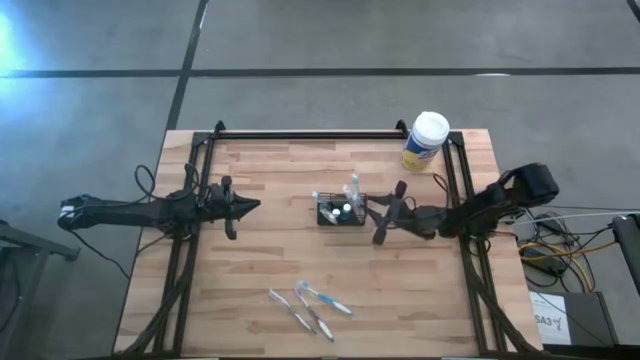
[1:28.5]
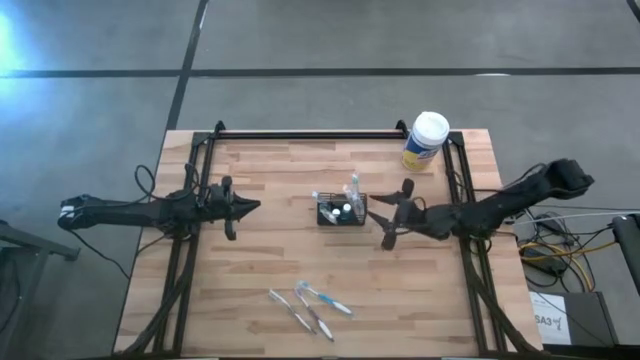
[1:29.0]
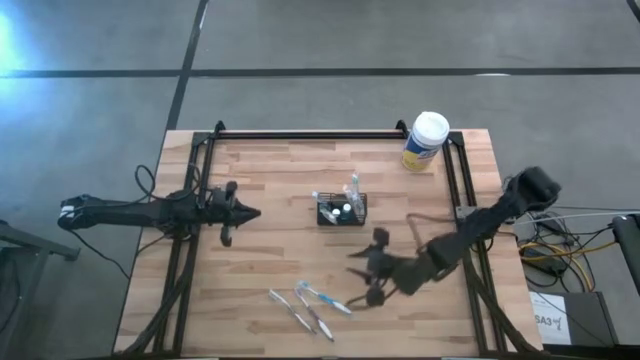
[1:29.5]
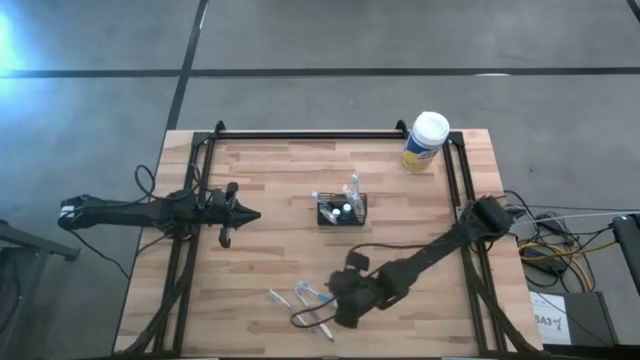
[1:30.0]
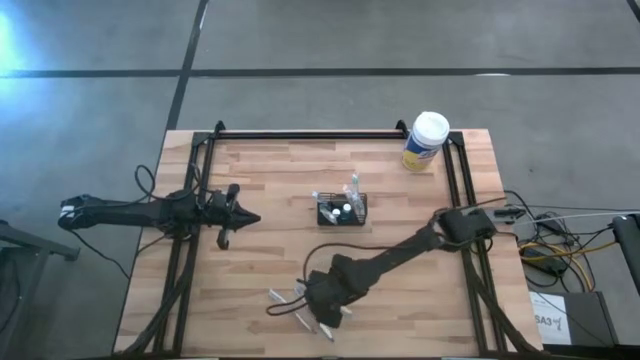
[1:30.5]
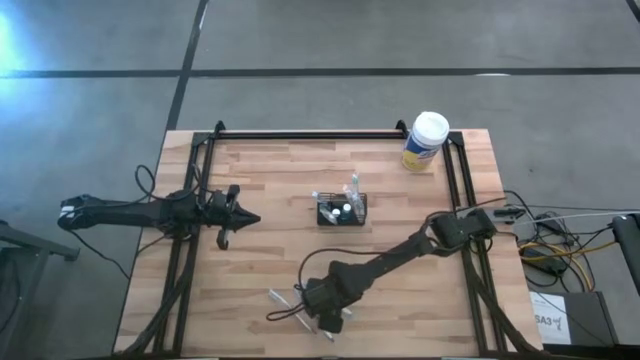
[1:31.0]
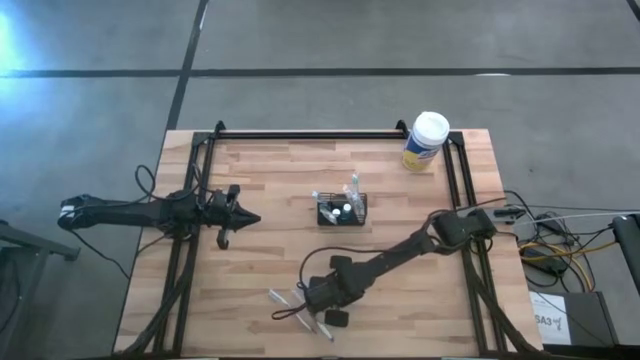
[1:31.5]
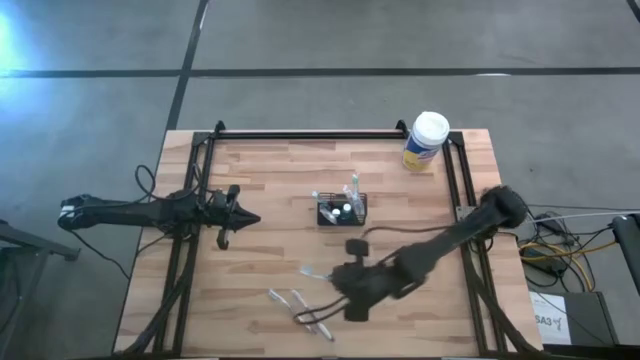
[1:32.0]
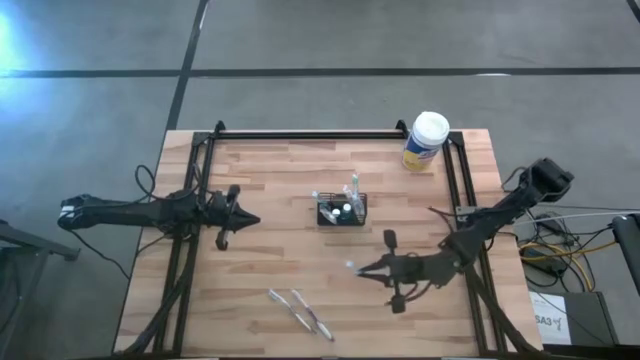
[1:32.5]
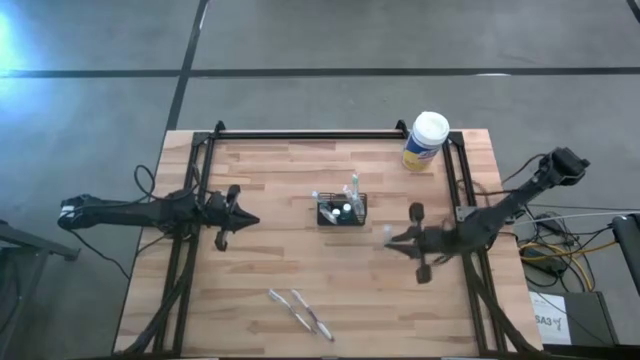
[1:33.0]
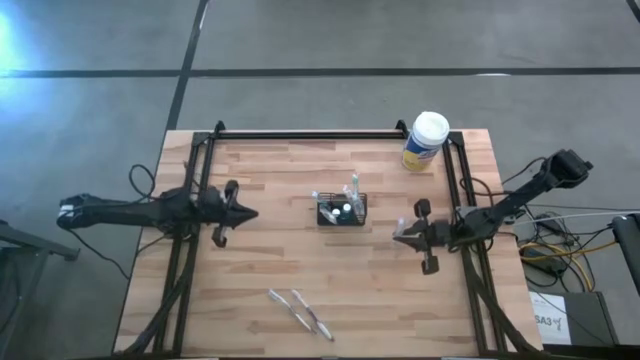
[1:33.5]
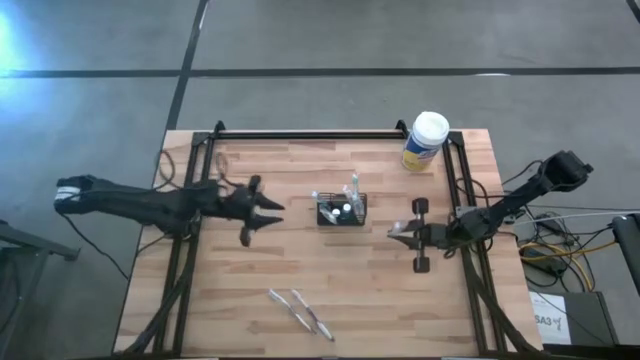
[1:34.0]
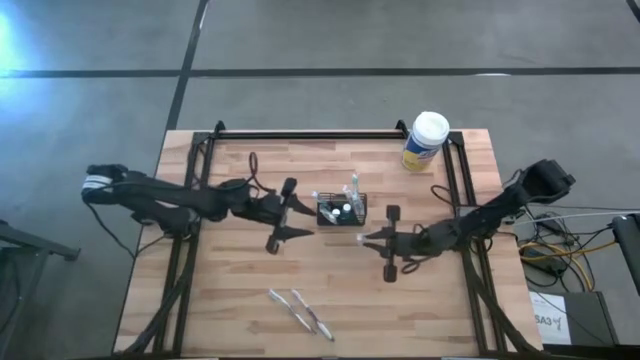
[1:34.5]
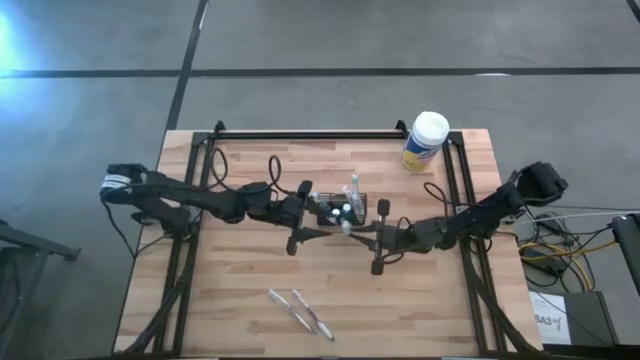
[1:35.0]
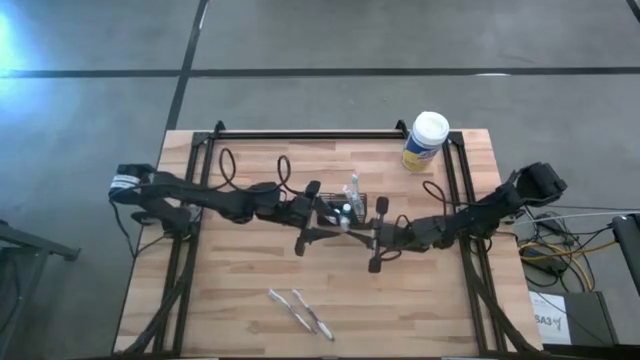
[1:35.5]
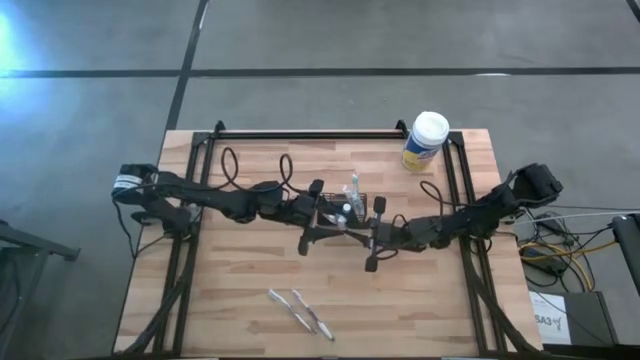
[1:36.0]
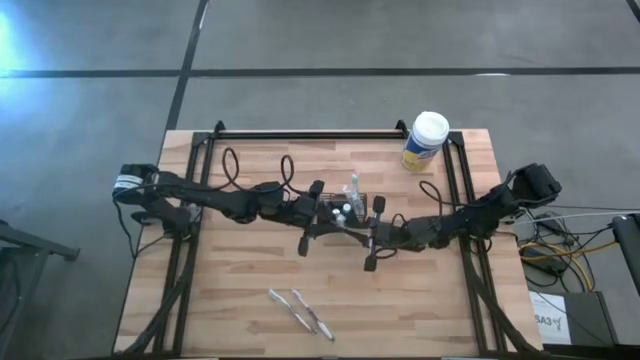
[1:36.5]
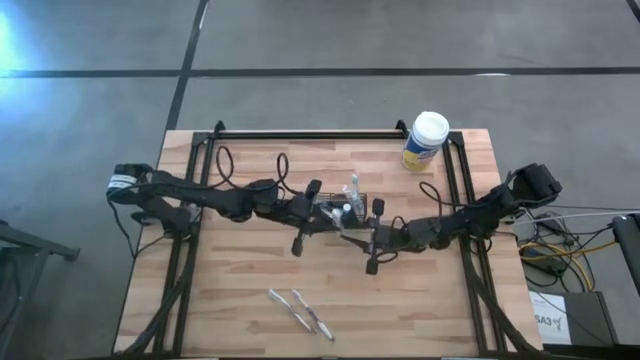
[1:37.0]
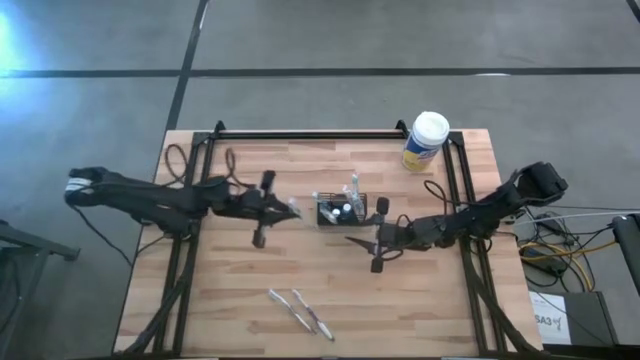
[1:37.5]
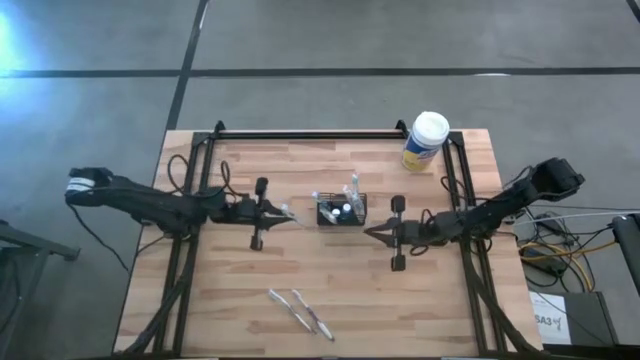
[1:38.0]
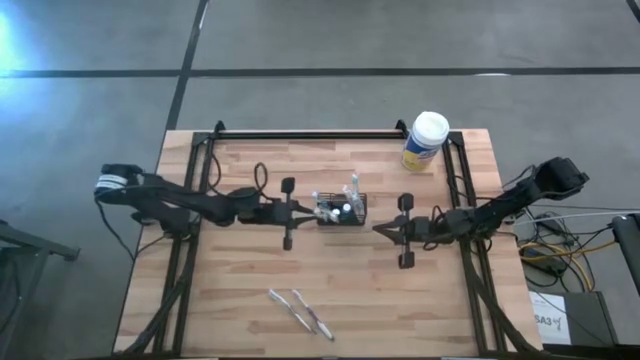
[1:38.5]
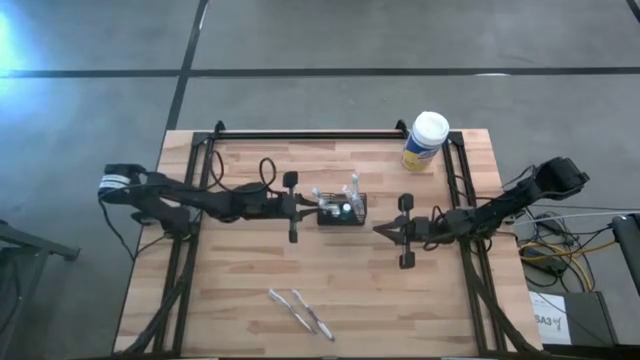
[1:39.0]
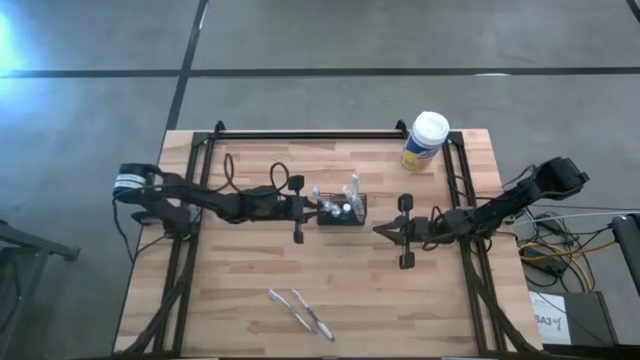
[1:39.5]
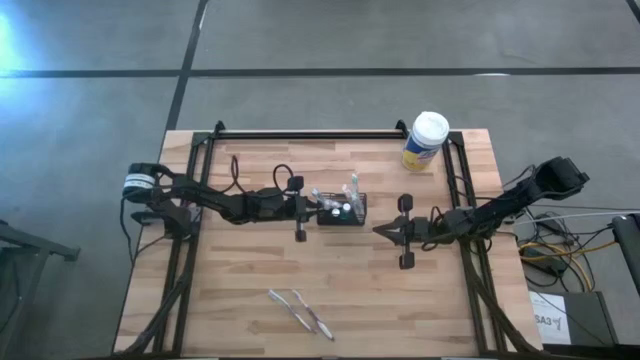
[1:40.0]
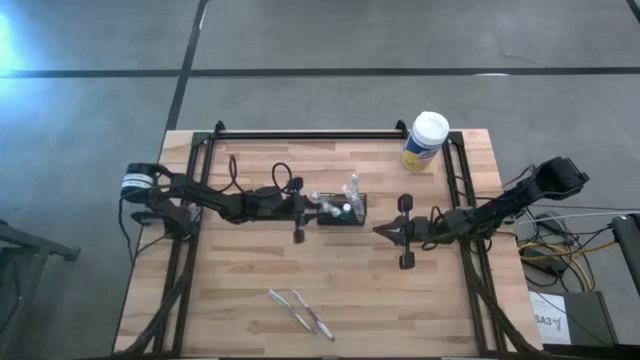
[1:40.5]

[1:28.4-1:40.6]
Task: Pick & Place toothbrushing station
Put the blue toothbrush into the wire organizer

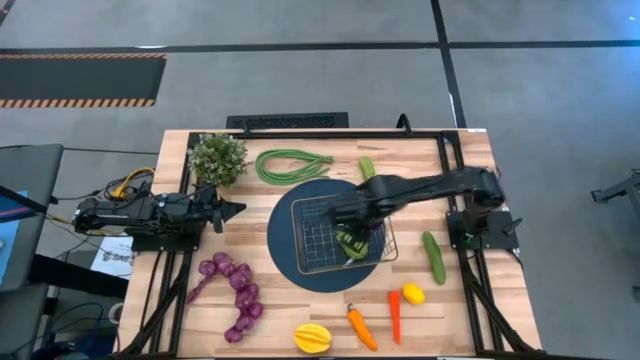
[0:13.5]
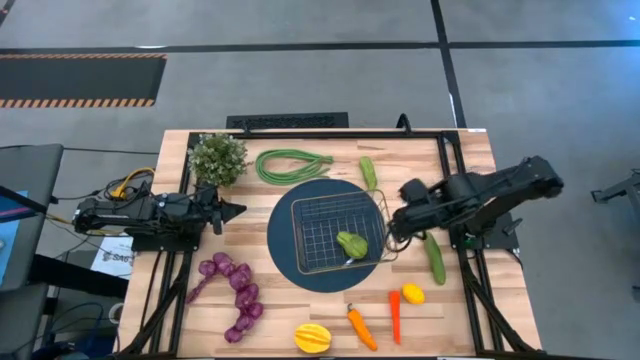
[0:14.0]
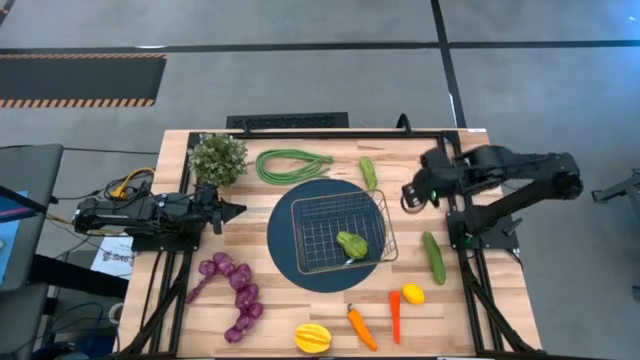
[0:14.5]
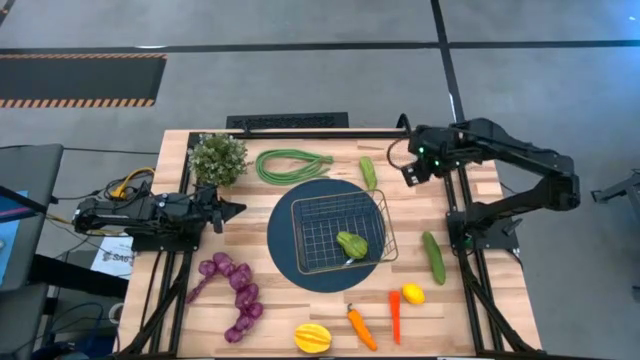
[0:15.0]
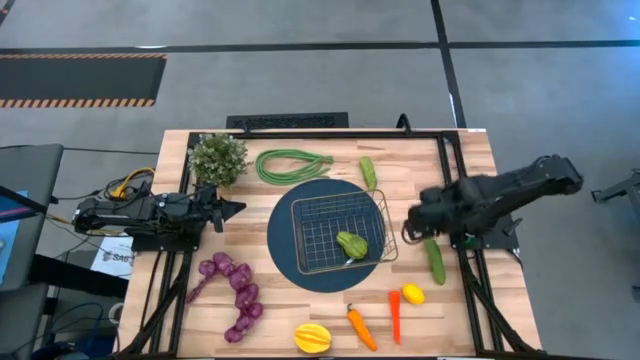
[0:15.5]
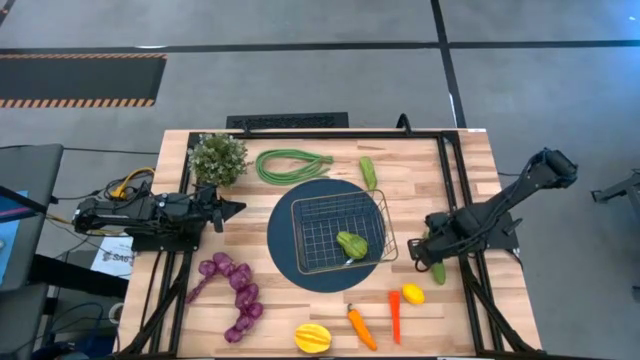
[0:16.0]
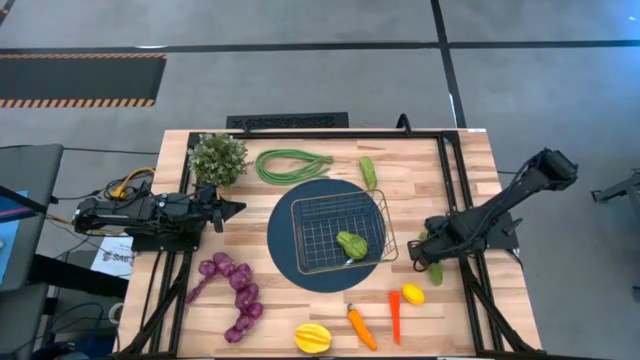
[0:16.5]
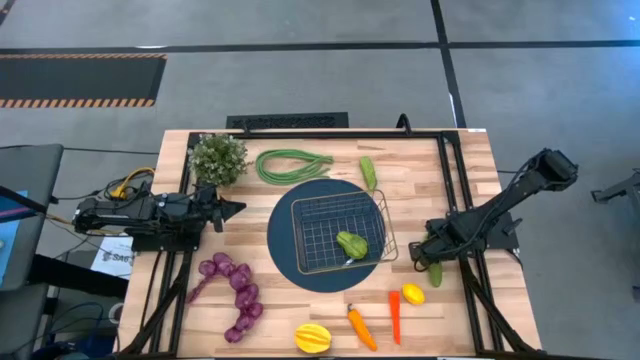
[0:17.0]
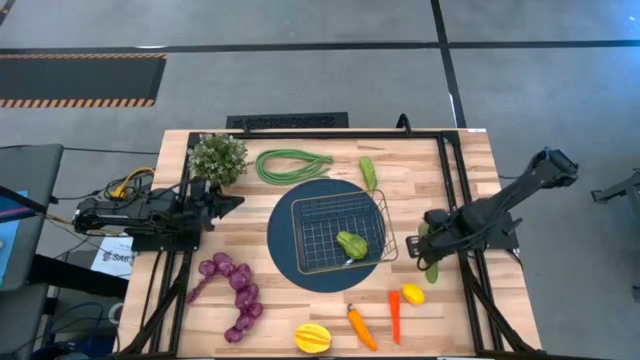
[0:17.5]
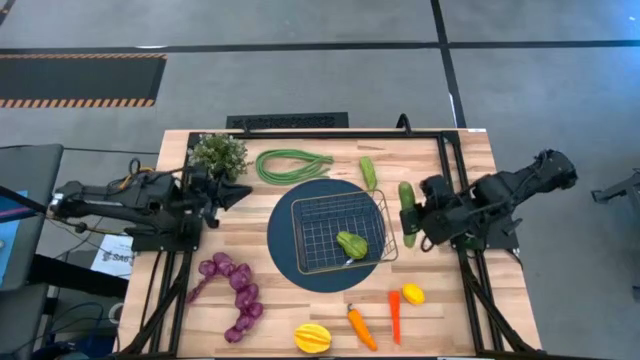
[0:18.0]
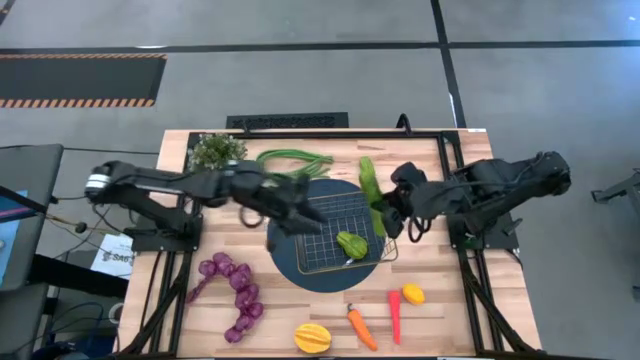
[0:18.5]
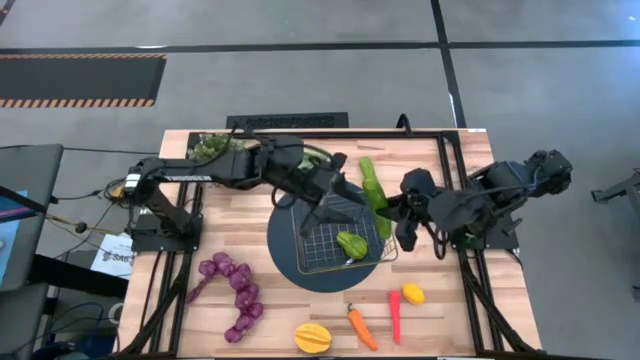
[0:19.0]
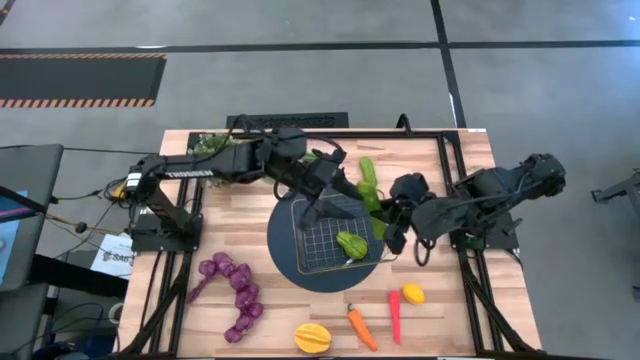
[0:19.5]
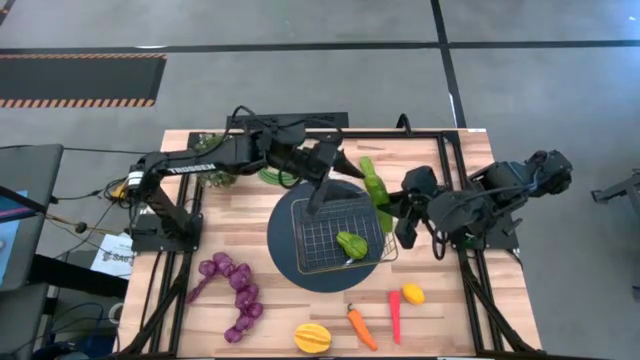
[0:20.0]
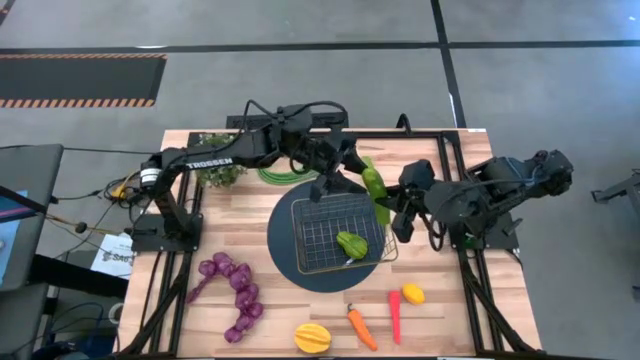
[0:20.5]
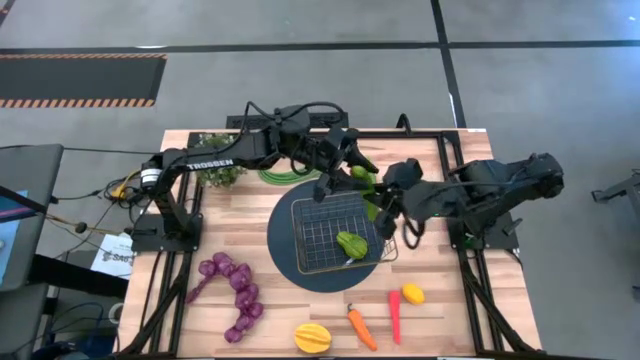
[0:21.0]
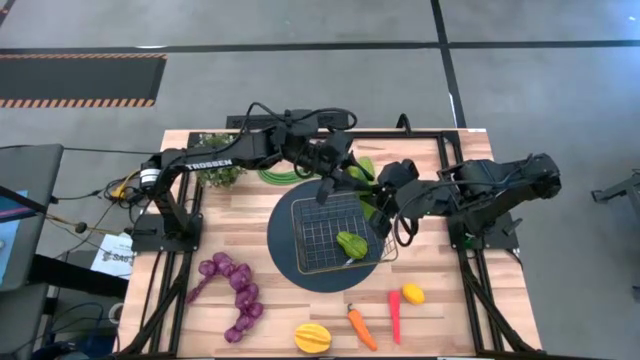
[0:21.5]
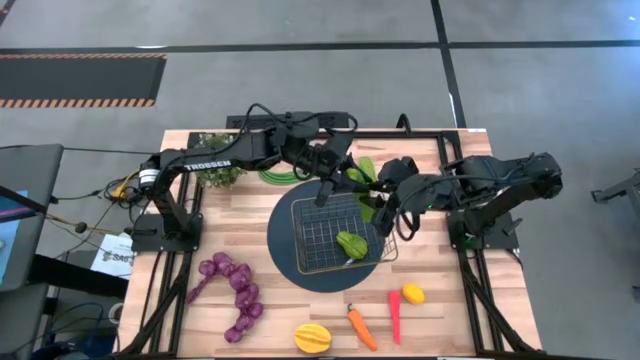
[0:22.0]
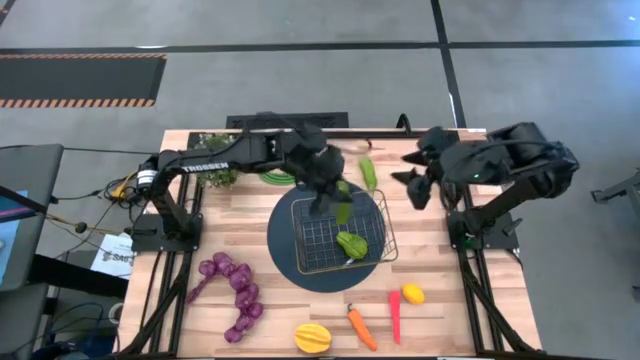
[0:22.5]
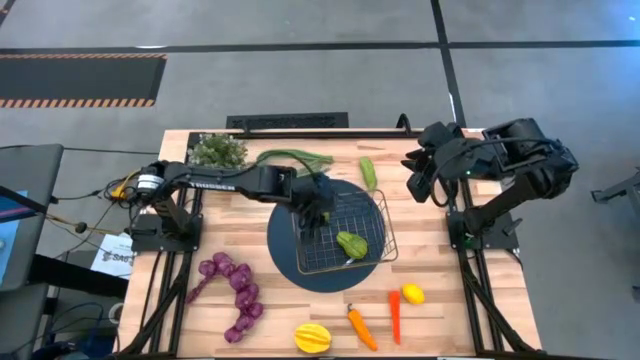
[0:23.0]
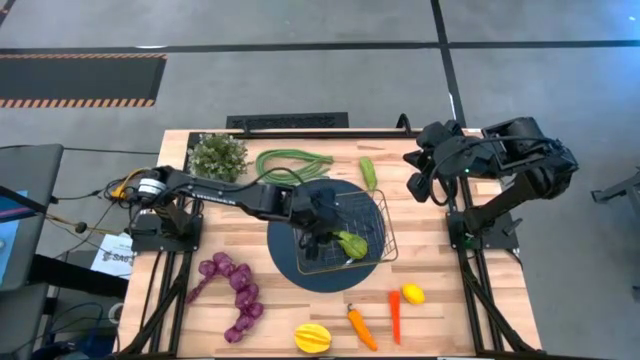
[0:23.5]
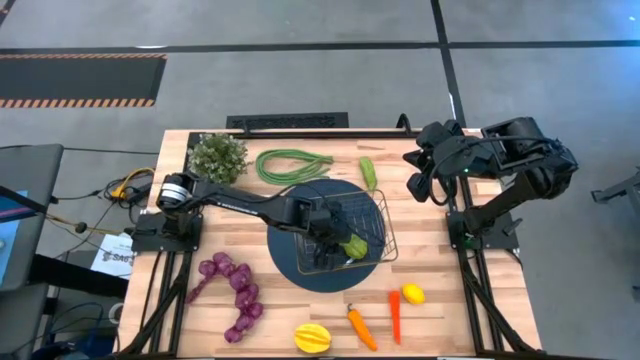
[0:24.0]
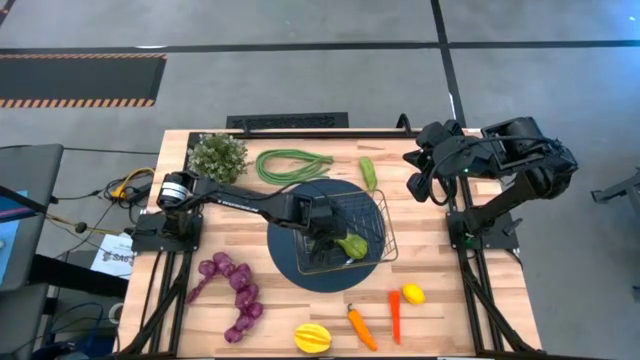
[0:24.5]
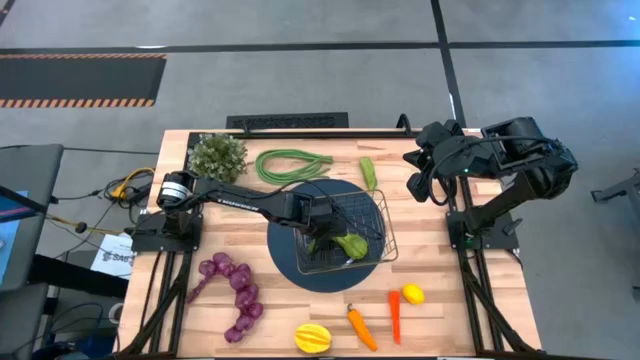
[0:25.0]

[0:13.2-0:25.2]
Task: Build produce basket
Put the bottom green cucumber into the gold wire basket
